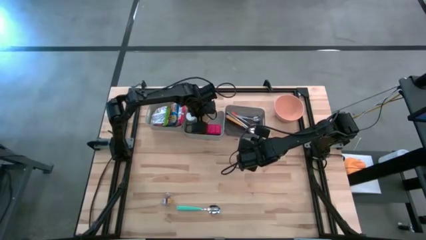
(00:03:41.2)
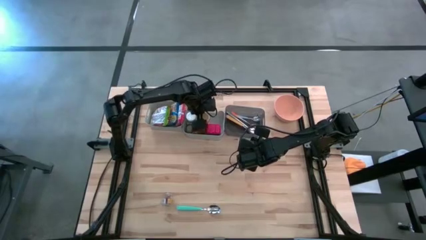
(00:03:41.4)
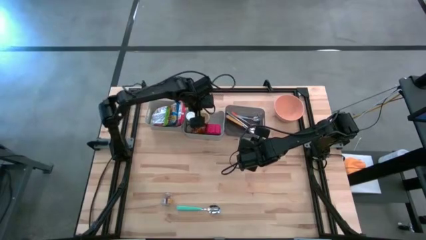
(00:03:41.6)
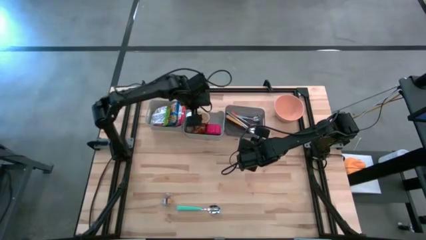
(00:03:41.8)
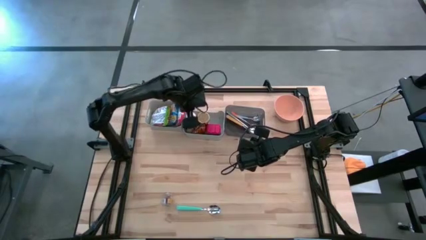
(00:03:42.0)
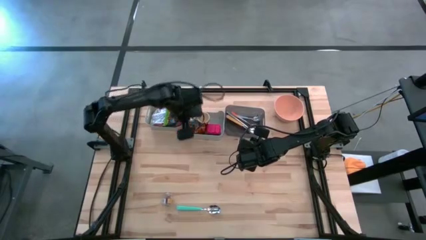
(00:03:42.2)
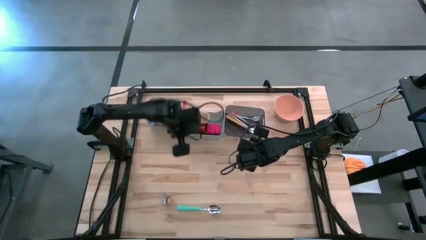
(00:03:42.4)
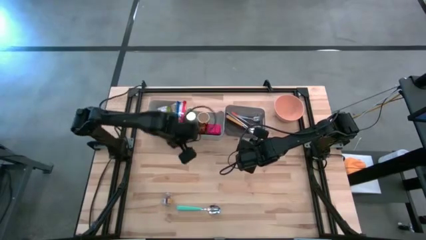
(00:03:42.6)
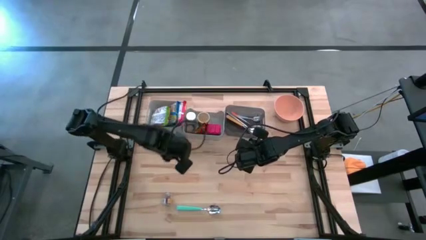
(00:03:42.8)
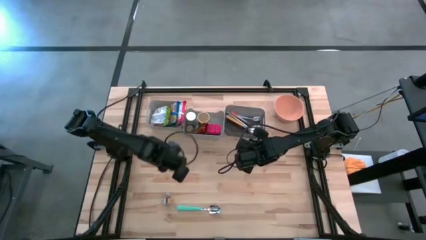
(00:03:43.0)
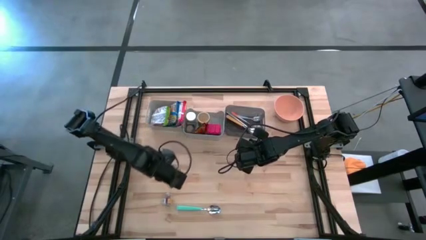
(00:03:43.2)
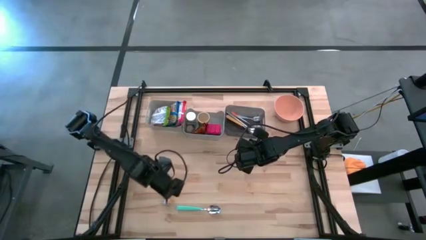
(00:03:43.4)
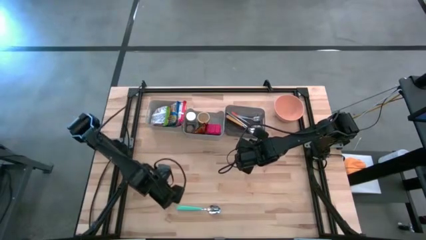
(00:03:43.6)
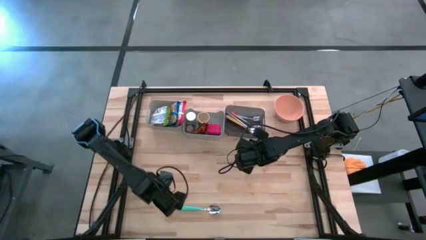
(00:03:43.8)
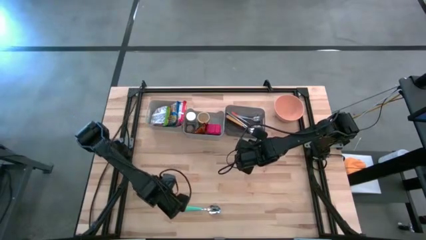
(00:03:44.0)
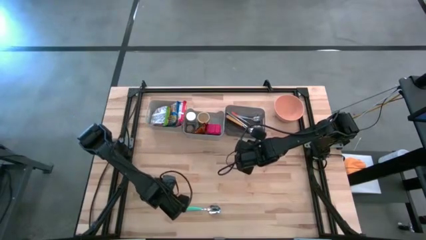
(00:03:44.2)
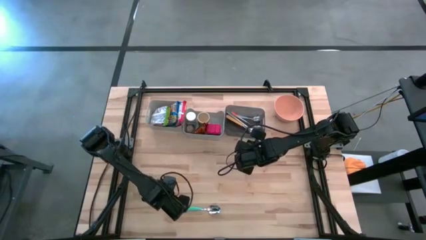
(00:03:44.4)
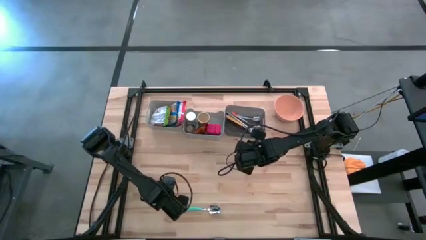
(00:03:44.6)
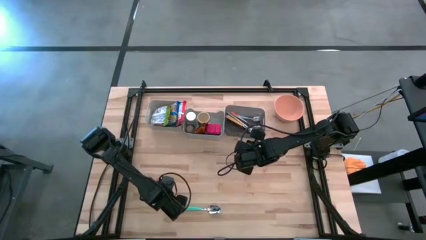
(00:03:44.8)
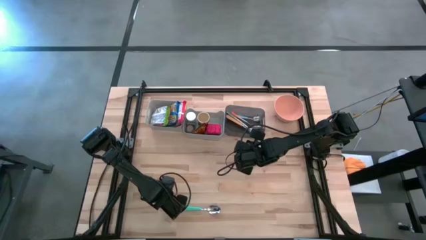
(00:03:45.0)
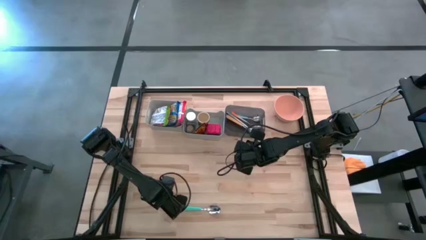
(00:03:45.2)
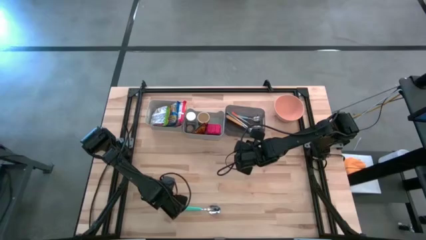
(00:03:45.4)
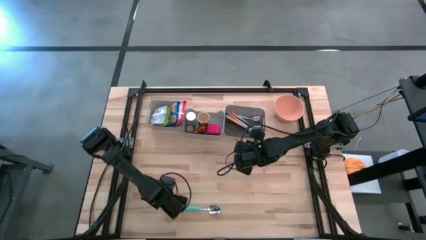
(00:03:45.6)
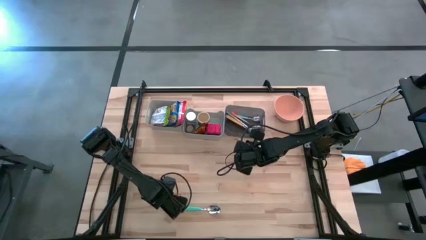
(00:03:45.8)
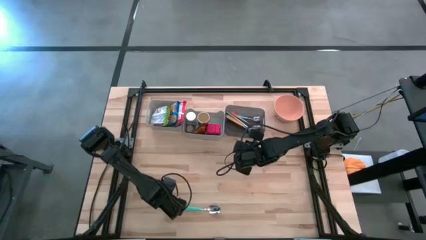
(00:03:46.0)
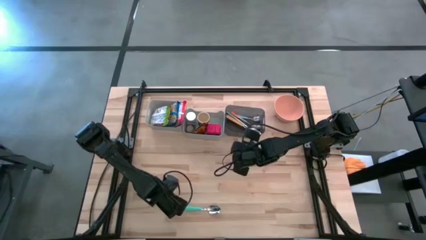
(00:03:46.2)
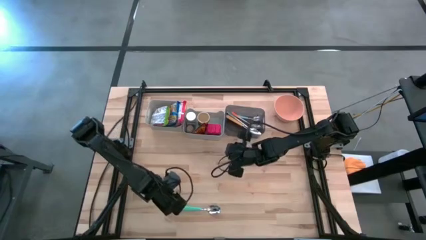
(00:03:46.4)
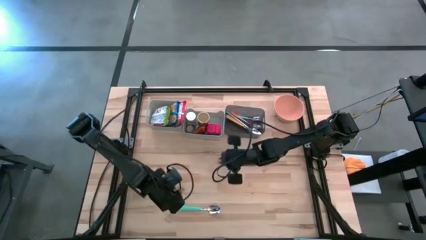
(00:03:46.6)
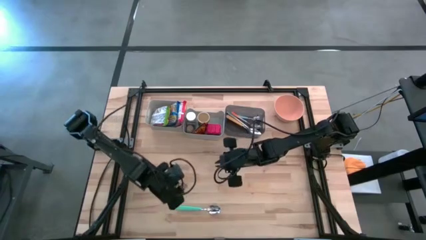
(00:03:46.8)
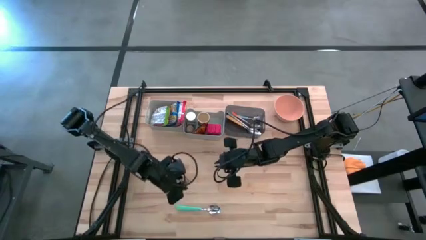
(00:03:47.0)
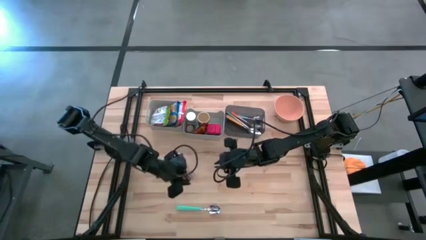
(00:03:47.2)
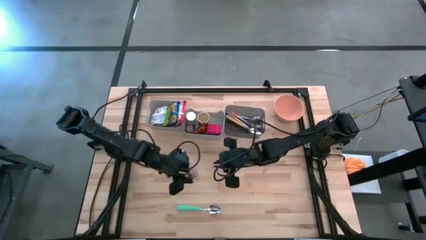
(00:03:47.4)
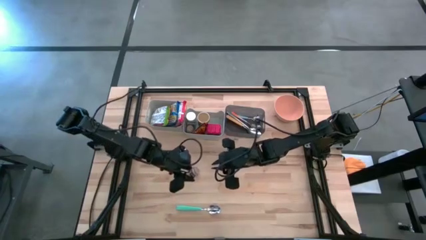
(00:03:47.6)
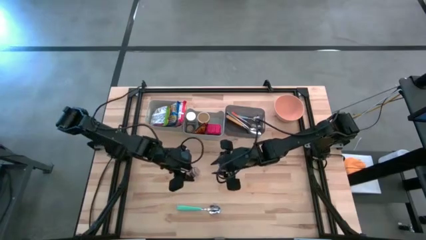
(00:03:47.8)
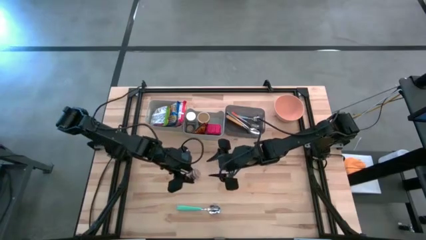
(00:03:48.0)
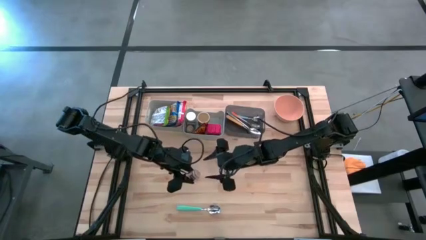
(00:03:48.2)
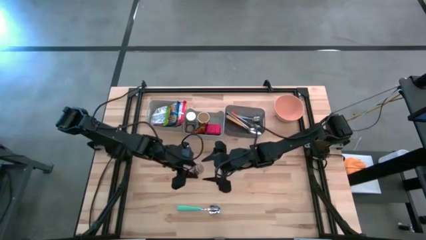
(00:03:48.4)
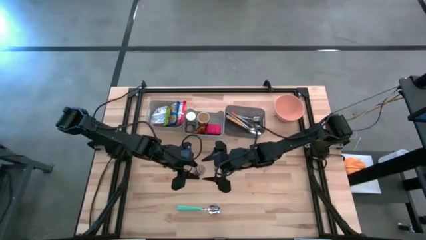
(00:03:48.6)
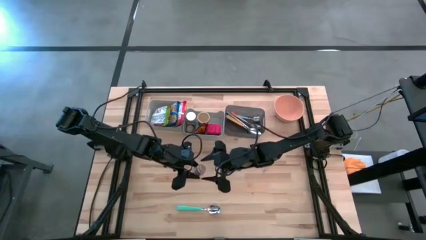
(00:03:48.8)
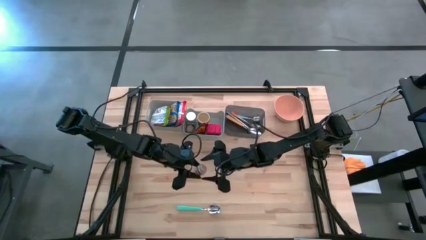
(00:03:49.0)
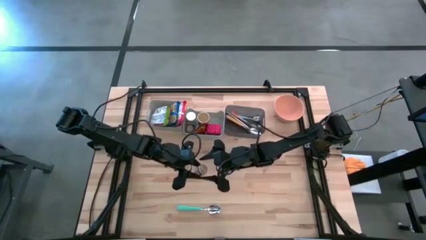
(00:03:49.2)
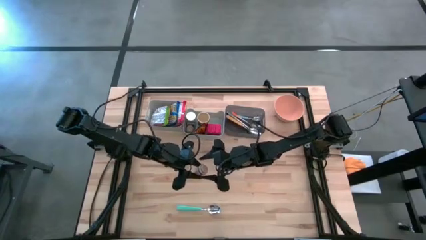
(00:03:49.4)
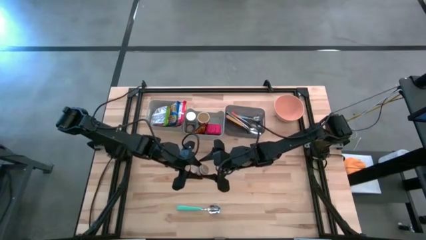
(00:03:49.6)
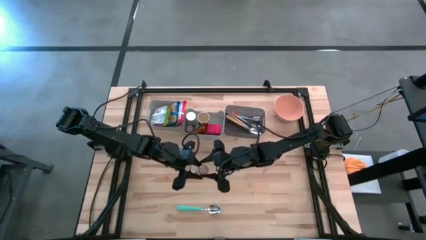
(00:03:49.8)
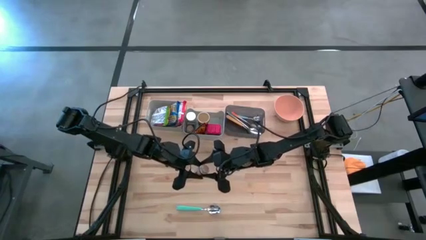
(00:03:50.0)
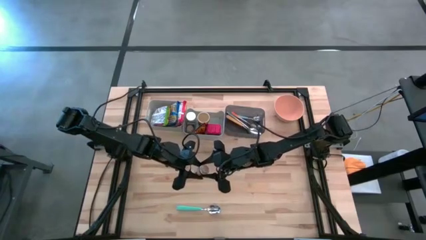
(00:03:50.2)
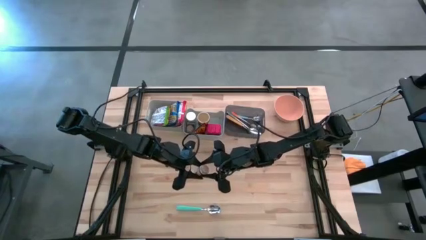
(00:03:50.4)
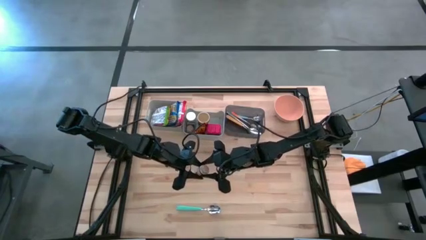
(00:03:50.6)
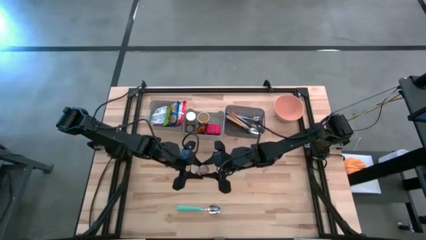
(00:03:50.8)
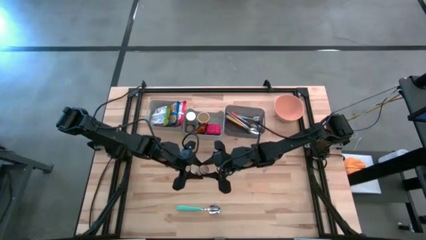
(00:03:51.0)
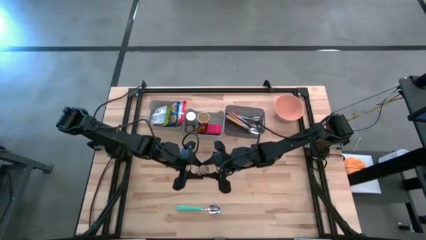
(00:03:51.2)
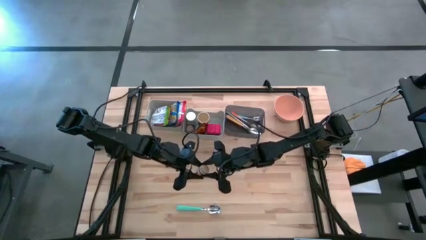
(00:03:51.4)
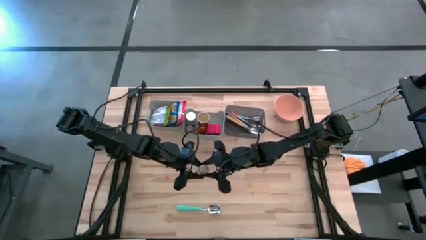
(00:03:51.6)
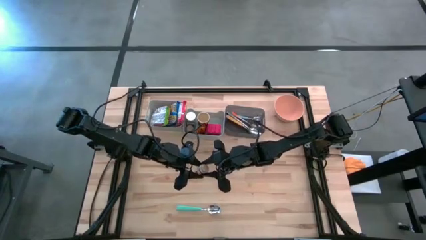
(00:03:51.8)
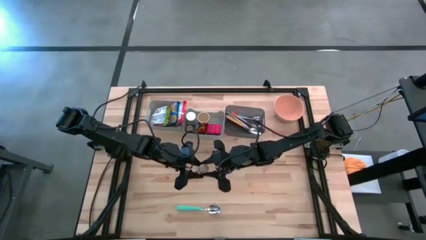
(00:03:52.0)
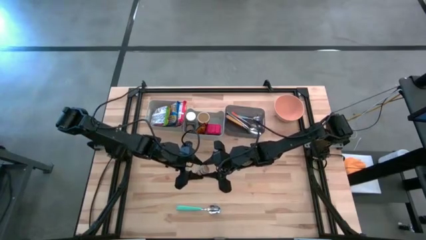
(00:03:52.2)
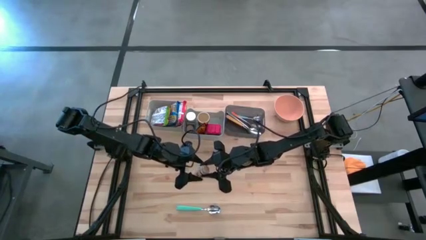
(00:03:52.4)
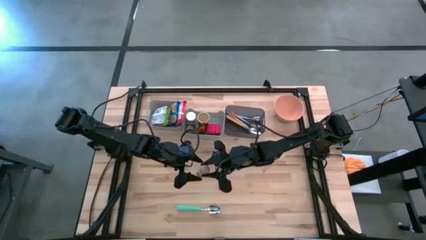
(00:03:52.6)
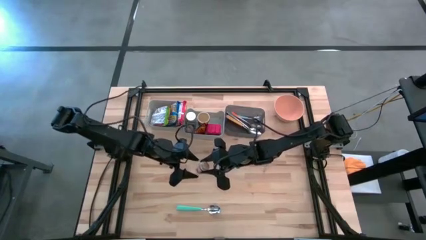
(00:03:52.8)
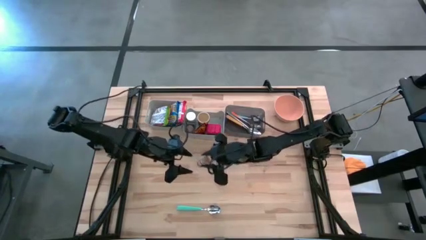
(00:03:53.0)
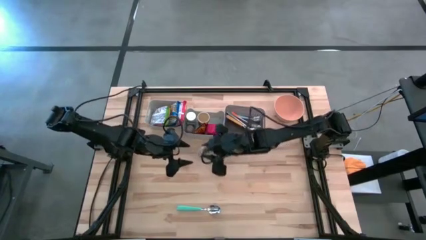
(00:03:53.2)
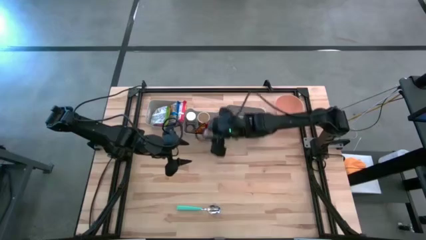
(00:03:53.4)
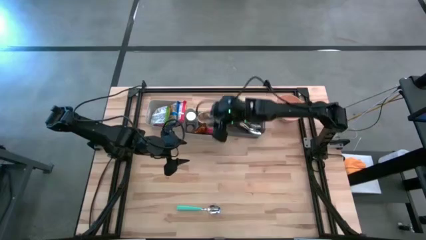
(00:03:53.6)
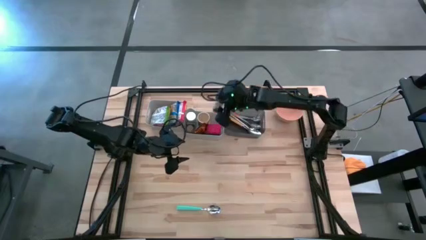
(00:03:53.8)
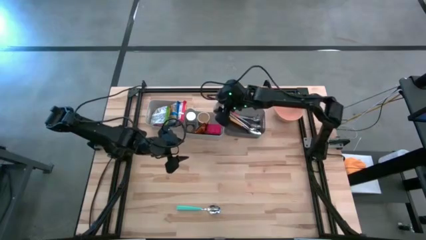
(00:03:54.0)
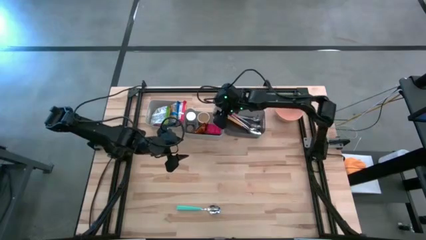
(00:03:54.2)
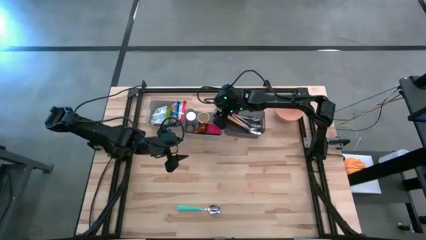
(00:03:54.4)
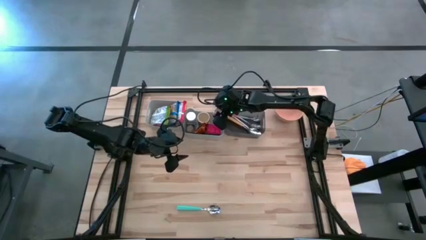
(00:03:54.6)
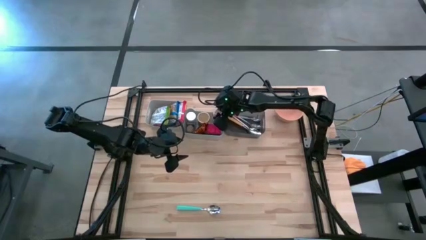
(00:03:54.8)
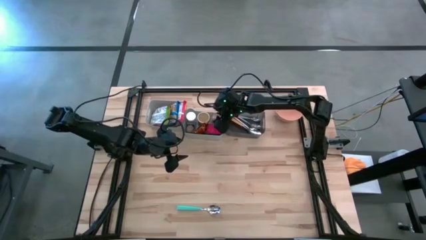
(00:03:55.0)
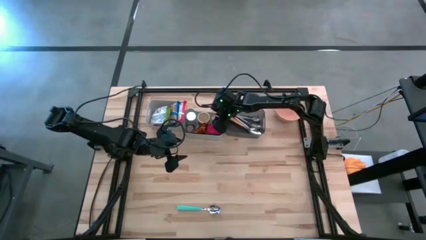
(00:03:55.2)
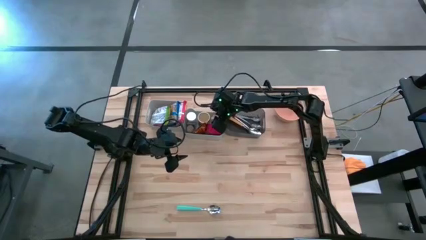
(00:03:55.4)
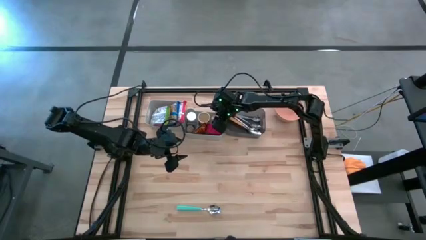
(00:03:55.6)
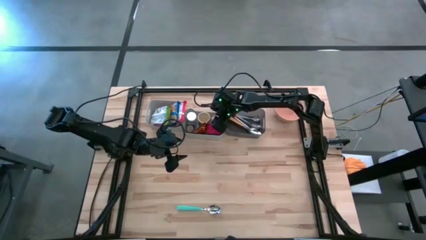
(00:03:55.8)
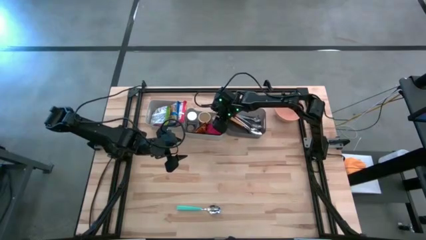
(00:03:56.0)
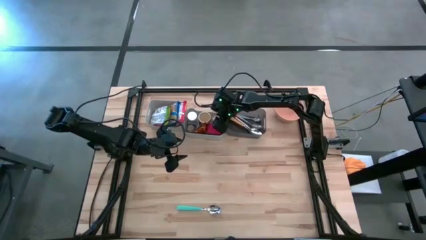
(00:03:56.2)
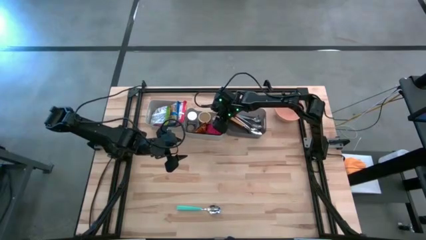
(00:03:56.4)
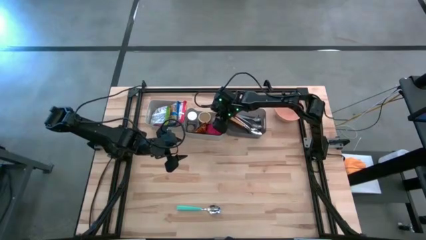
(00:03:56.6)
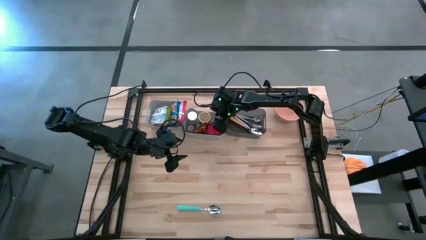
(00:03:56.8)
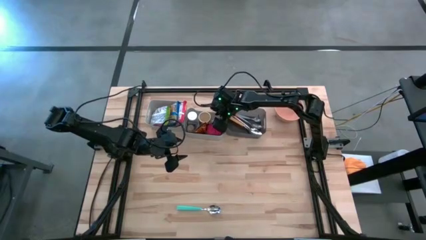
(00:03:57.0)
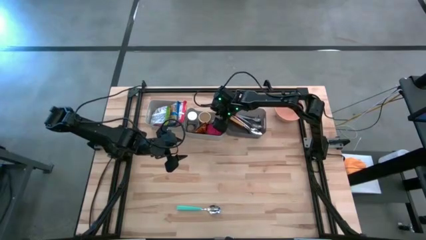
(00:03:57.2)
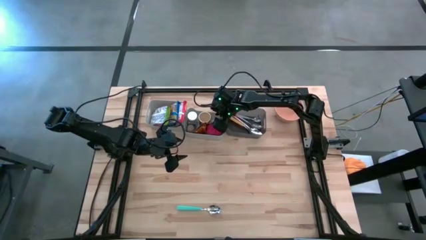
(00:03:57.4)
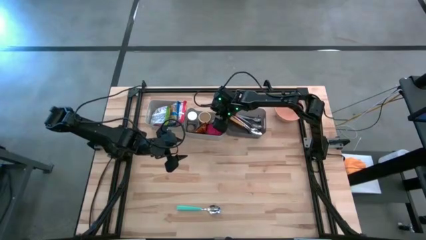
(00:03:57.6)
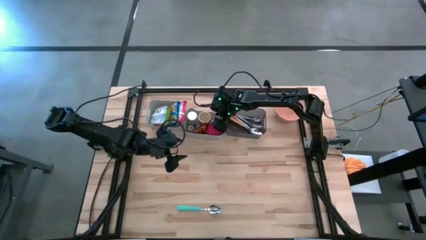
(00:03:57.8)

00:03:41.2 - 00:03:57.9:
Put the brown seasoning bottle into the right gray bin
